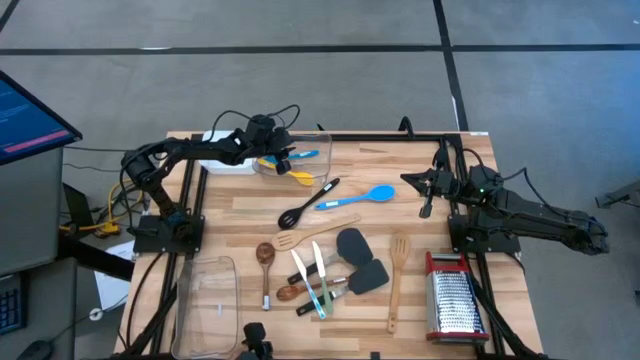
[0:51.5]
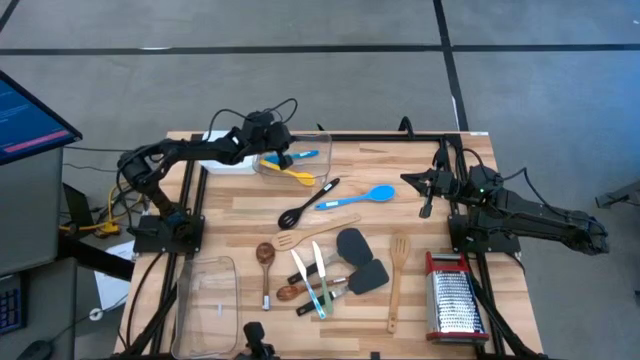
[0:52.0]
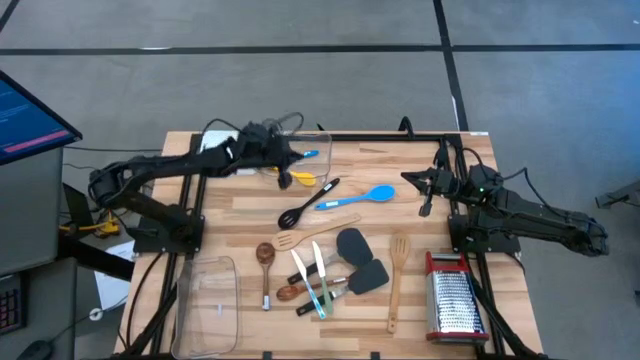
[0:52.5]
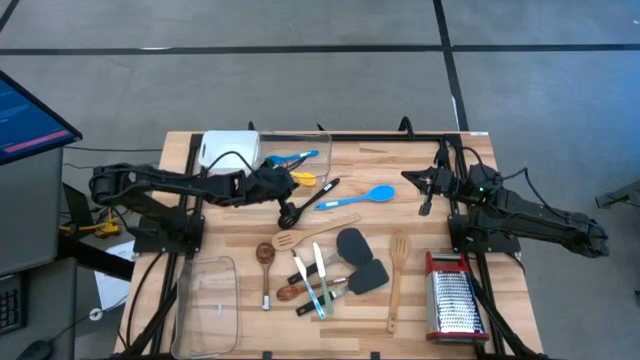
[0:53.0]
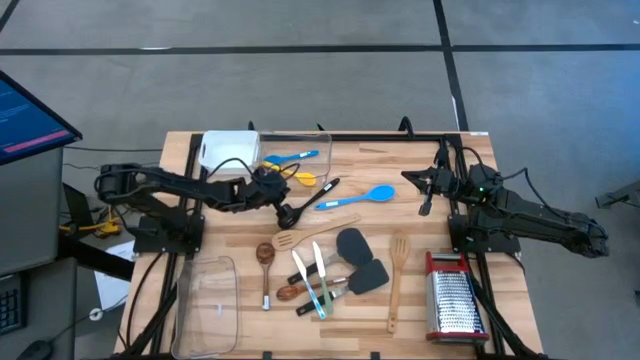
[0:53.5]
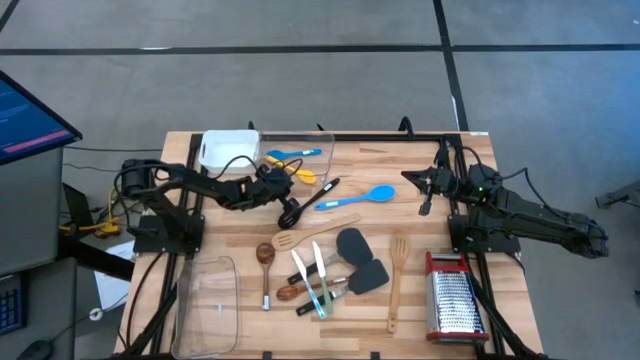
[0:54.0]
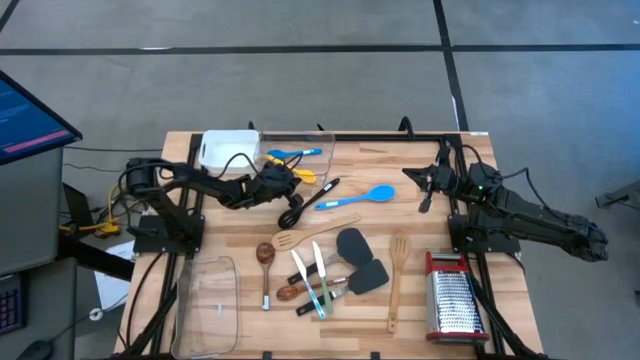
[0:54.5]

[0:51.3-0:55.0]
Task: Pick & Place Kitchen Items
Adjust the top transparent bin

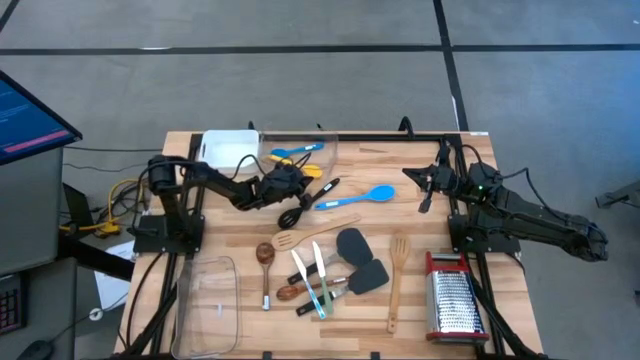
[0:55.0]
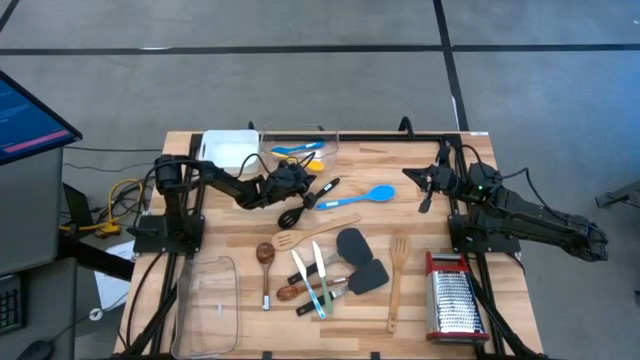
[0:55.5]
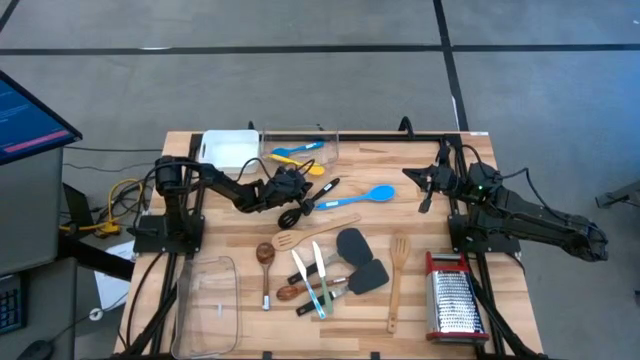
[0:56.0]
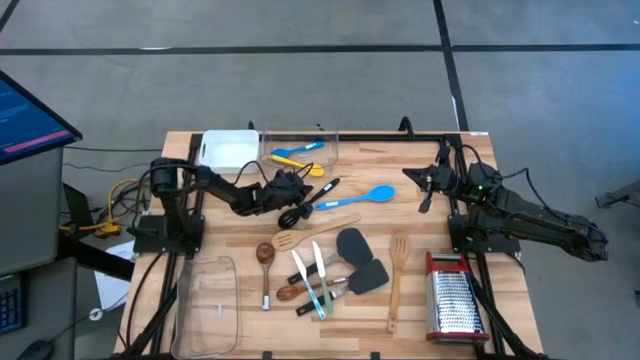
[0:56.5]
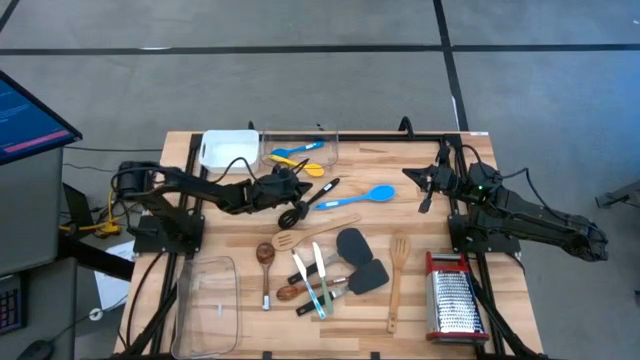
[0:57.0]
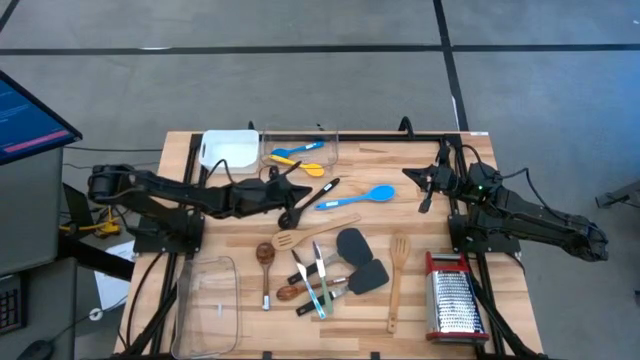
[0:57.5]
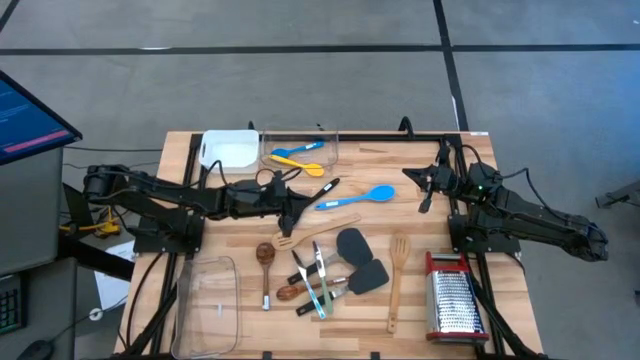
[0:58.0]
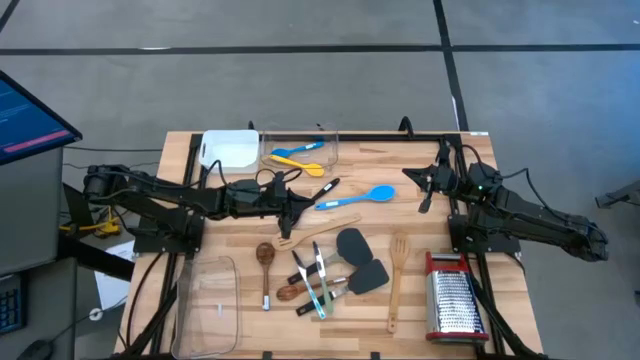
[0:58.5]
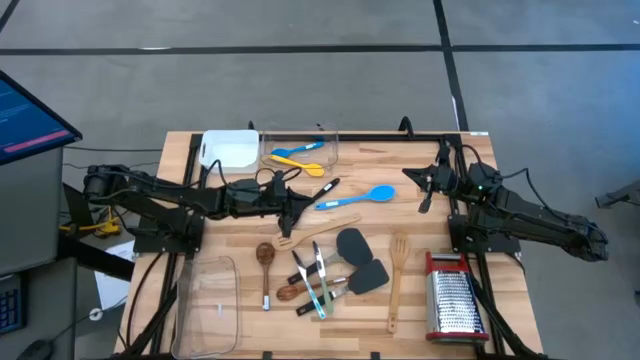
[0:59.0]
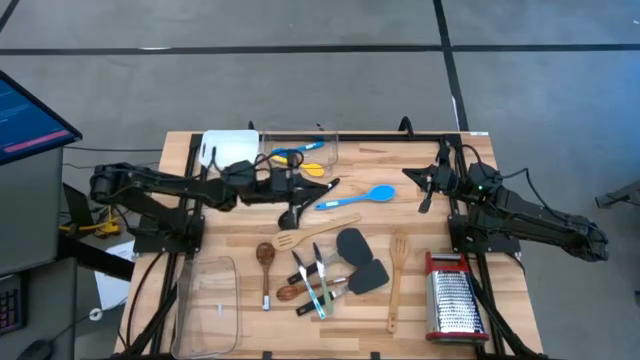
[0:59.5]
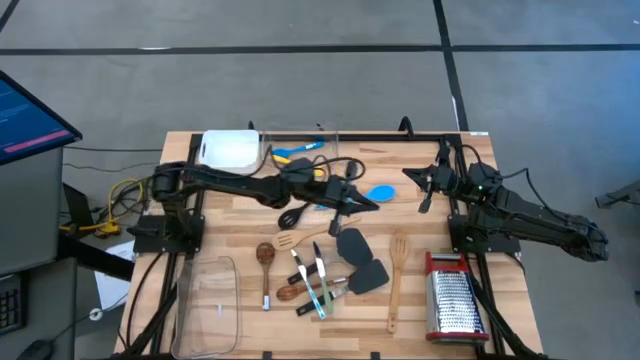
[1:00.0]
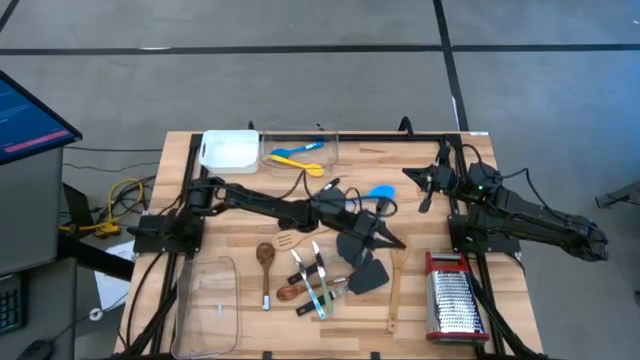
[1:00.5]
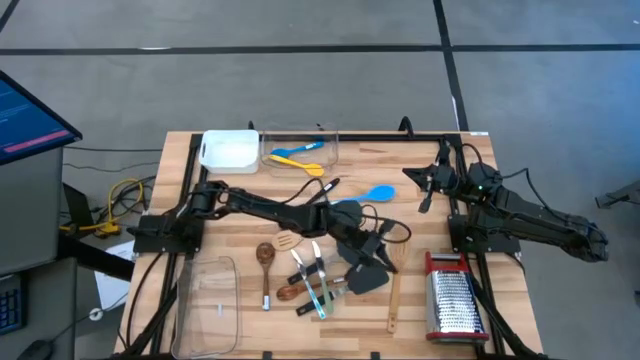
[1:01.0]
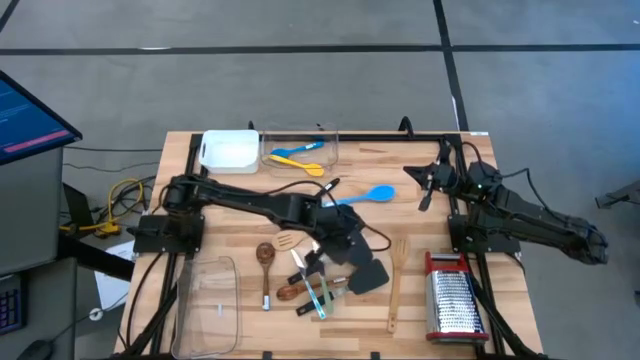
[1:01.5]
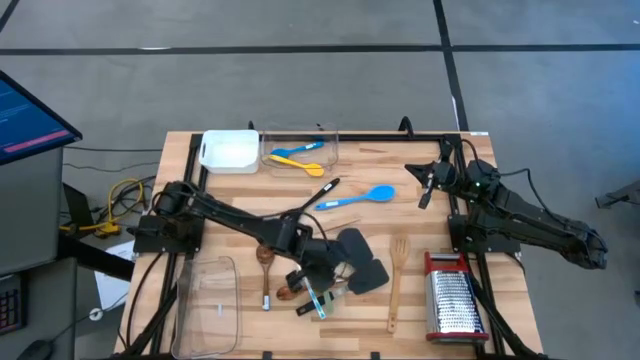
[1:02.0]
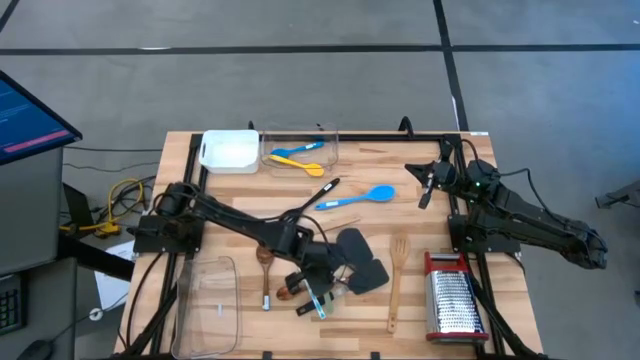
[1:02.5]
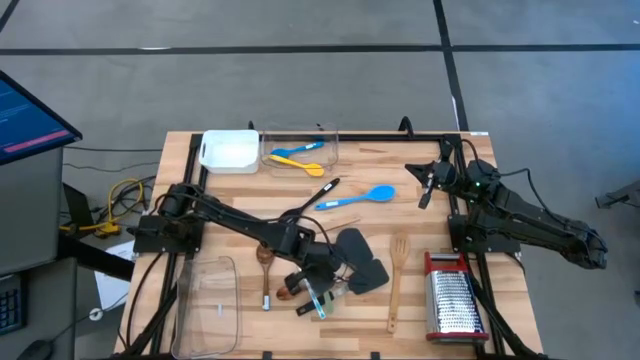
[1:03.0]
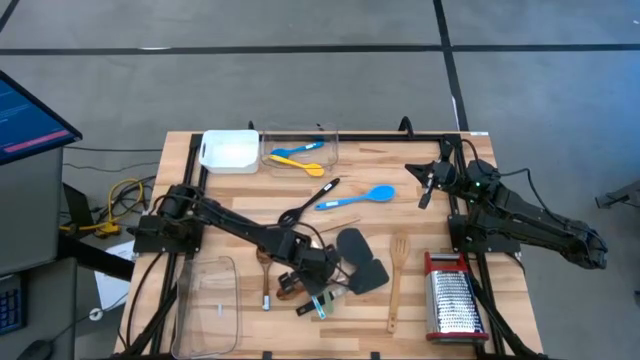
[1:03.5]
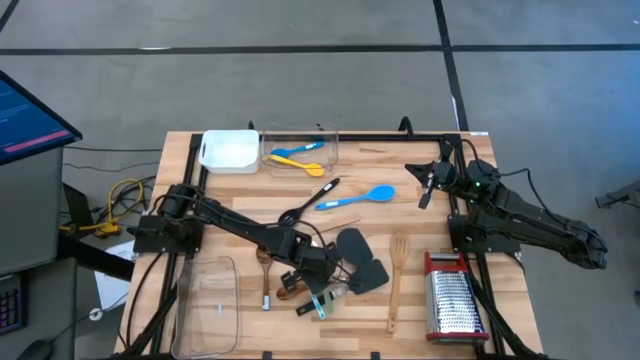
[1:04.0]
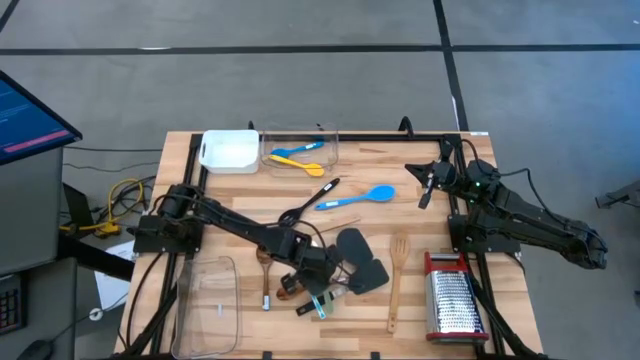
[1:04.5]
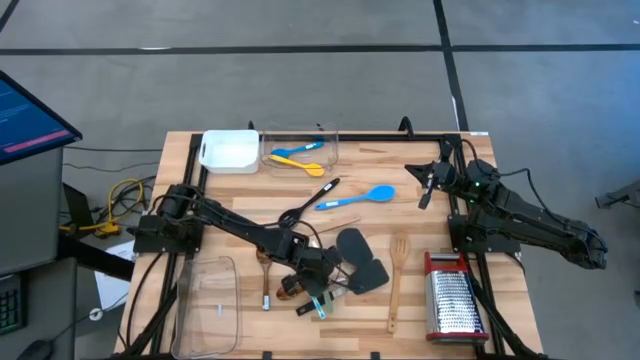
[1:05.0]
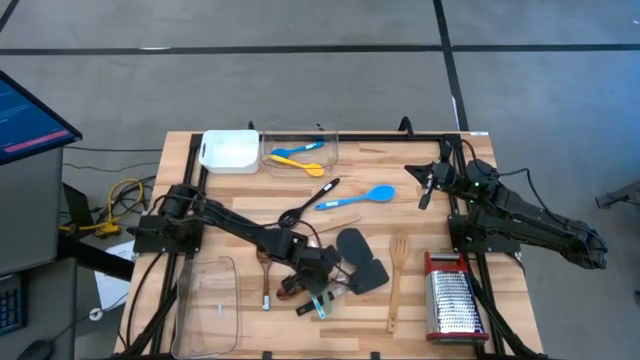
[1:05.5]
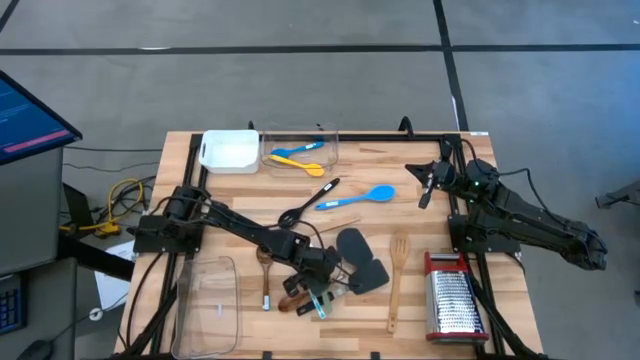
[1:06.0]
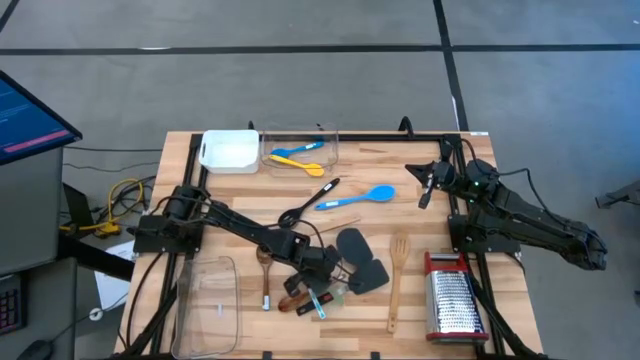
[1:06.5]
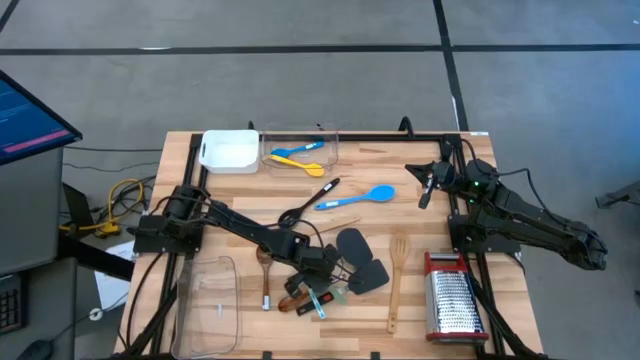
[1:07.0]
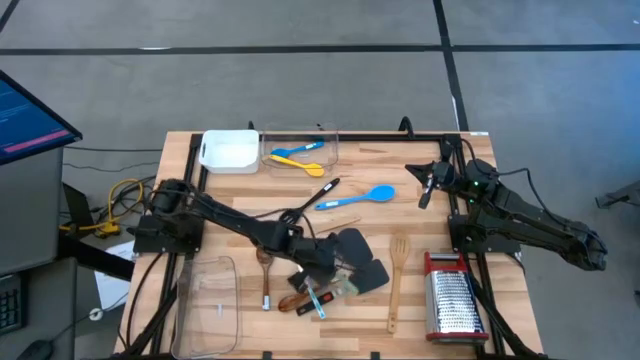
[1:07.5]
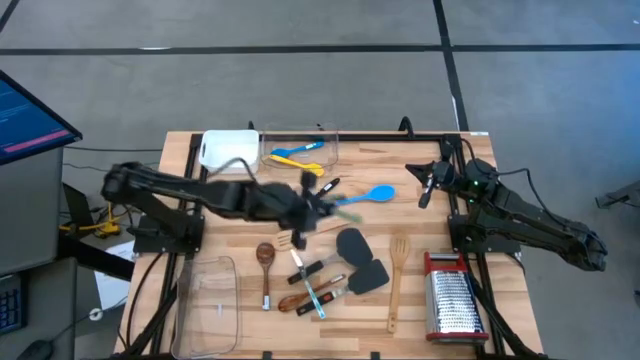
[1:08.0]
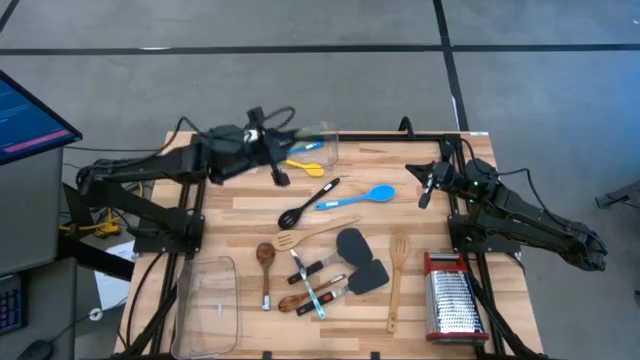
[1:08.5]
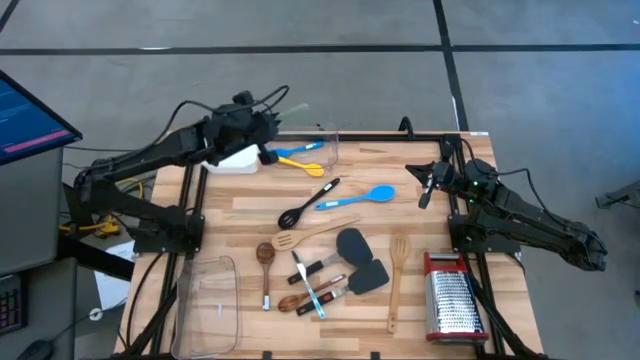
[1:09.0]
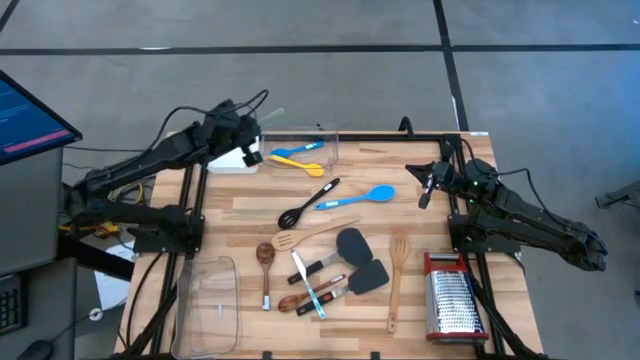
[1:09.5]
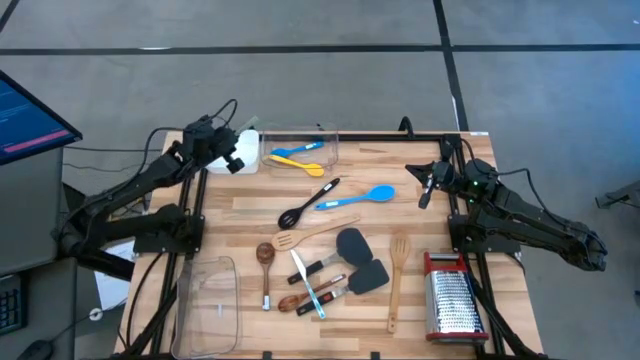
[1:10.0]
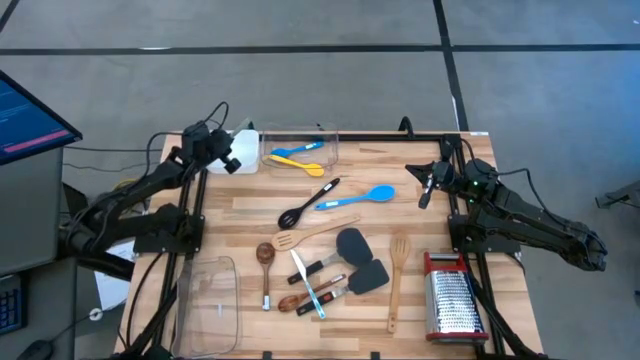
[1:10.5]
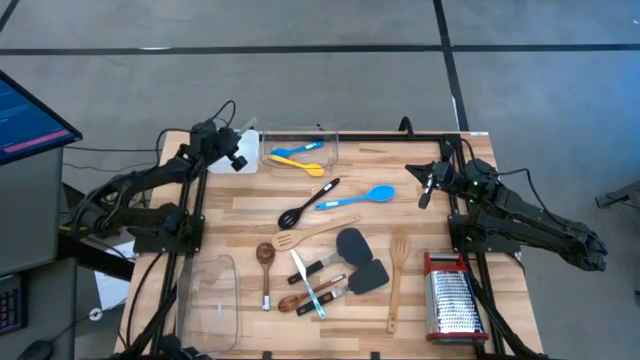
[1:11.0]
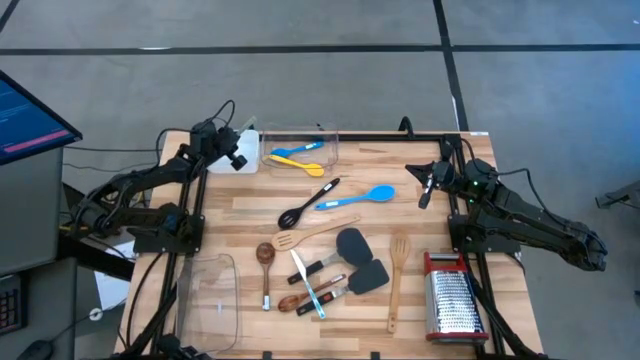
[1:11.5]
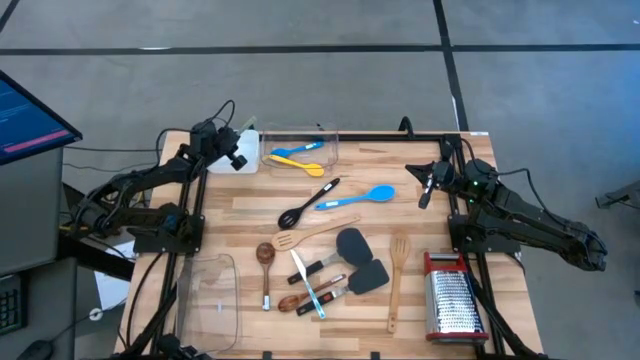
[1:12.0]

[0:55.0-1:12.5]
Put the green table knife into the white bin
